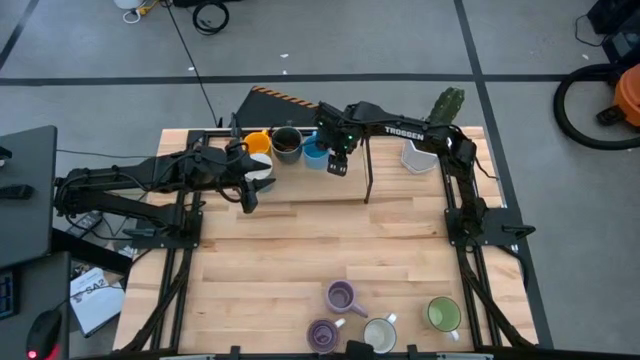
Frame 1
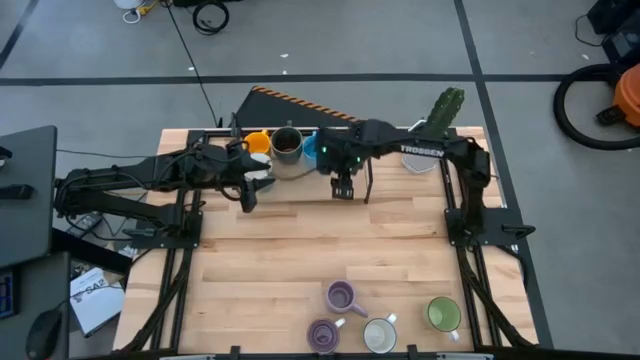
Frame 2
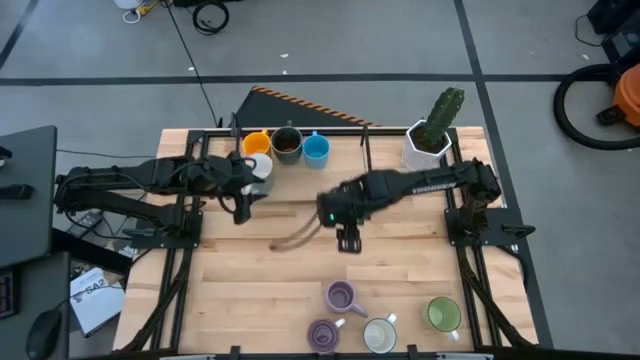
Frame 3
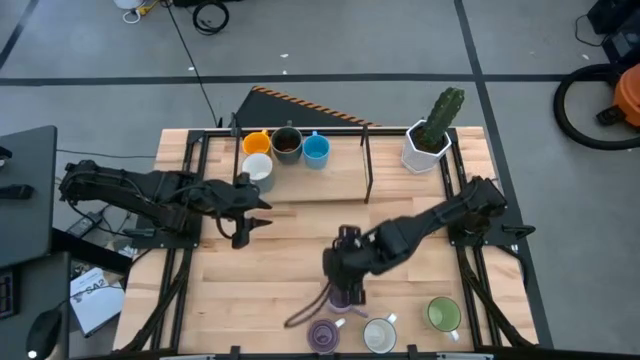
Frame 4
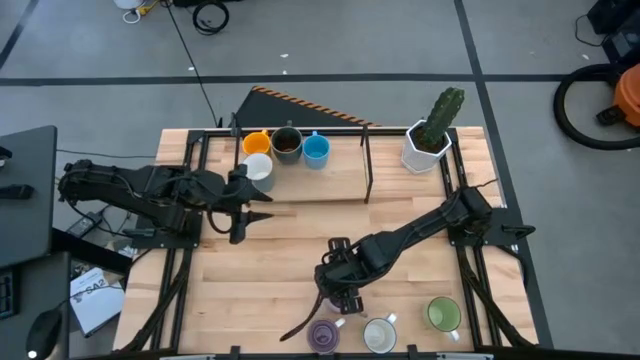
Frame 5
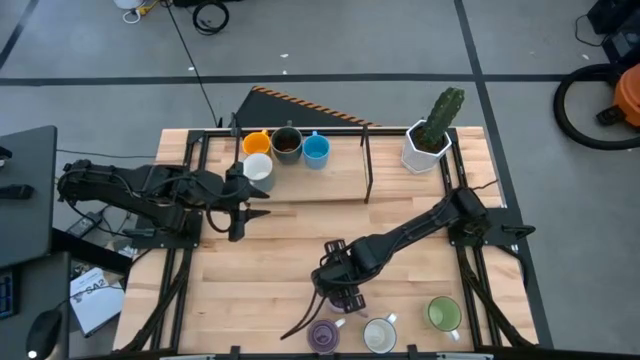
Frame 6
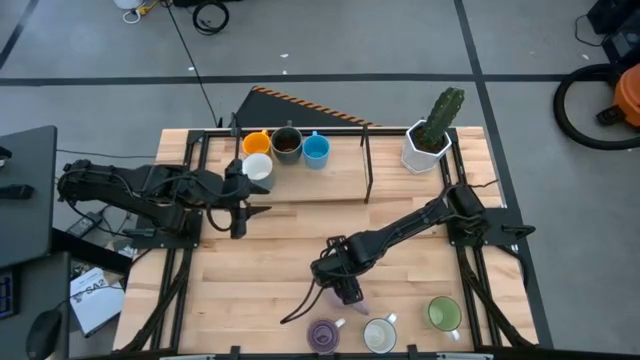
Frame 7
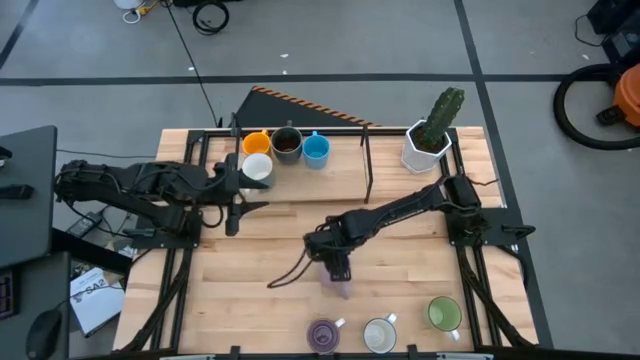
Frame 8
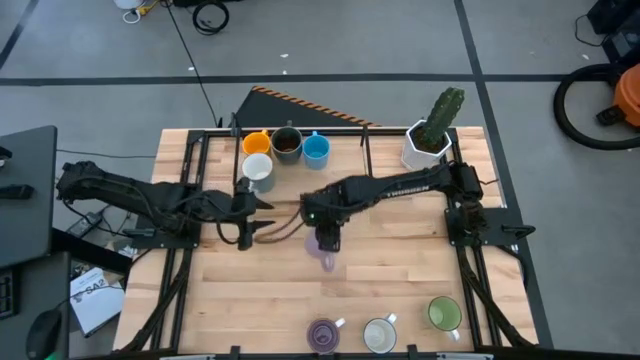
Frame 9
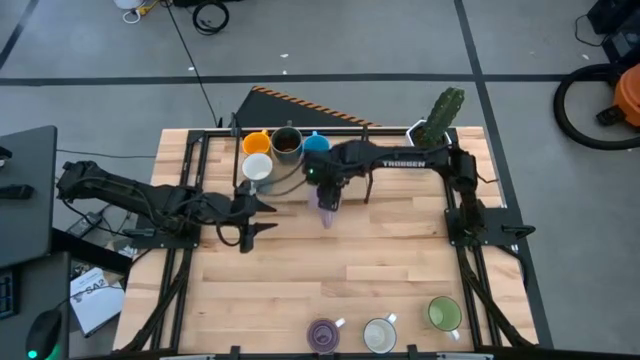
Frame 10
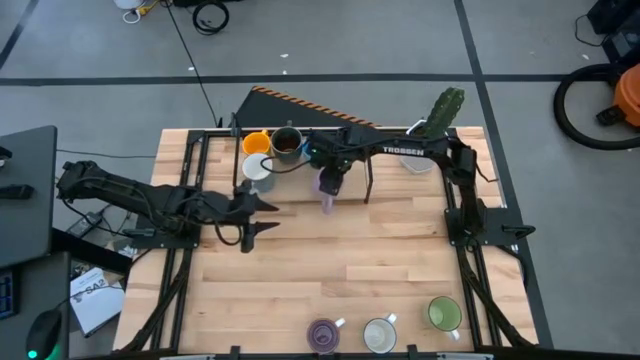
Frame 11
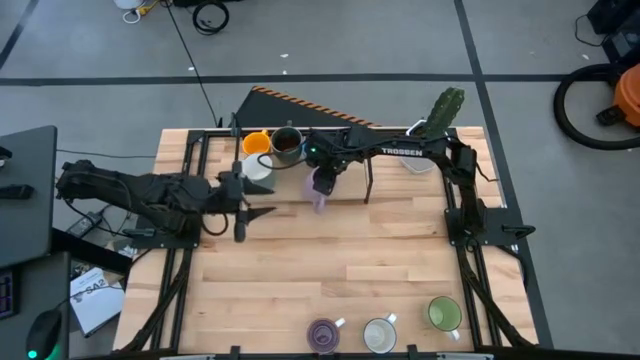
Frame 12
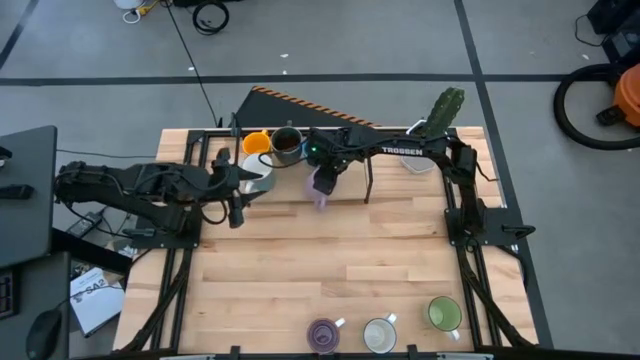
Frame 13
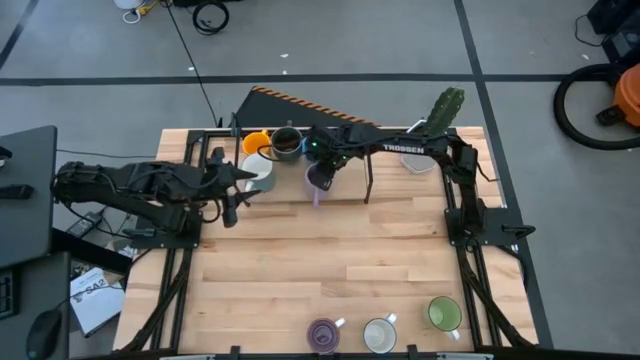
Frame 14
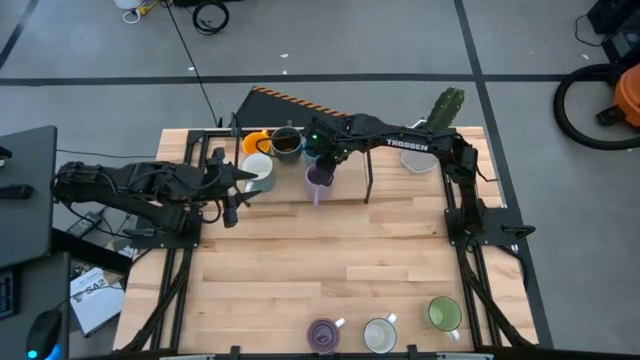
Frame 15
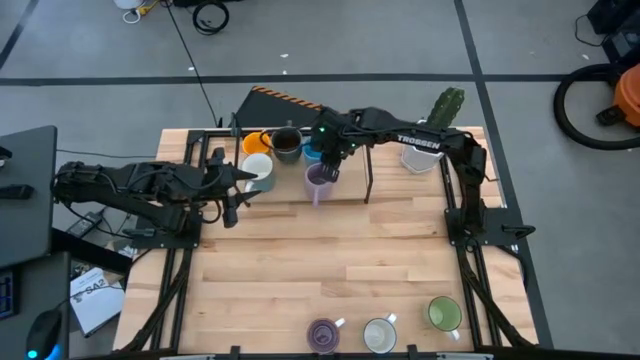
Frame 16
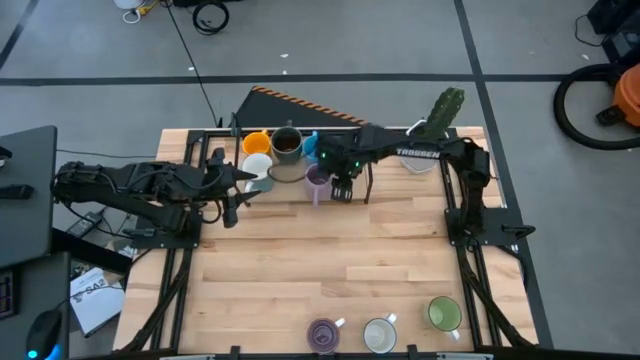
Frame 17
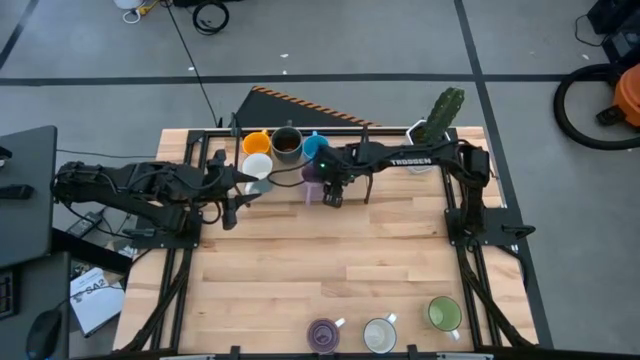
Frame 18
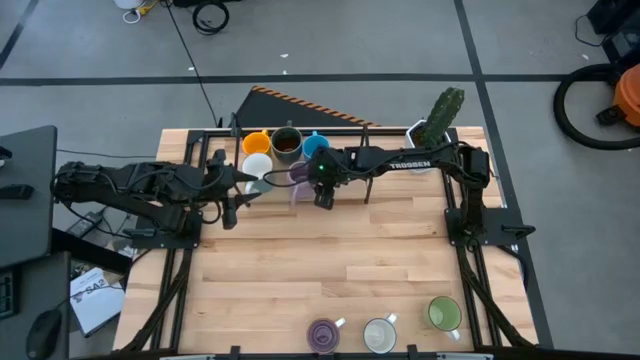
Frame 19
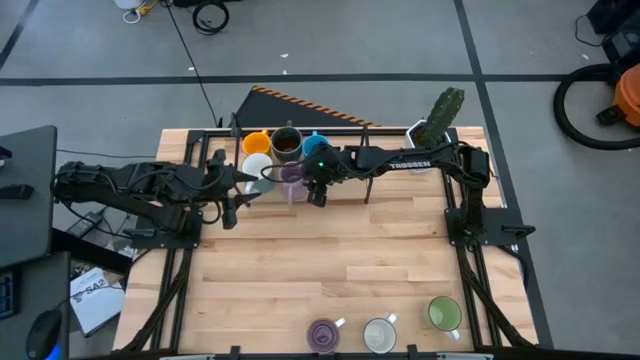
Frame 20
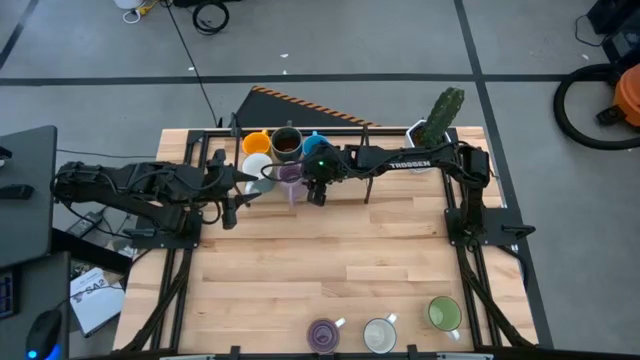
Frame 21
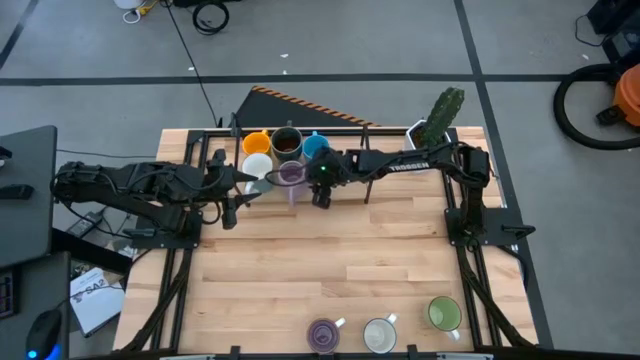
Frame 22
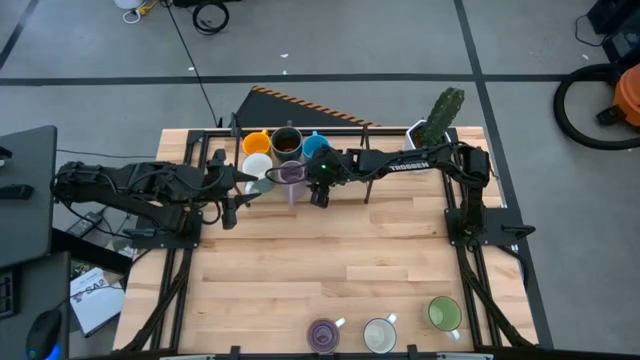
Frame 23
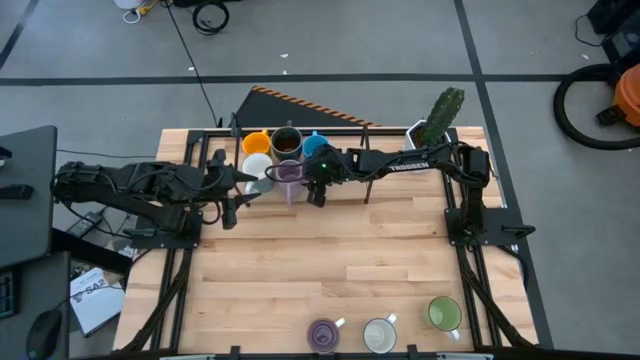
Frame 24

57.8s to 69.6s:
Task: Place coffee mugs
Put the purple mug on the shelf

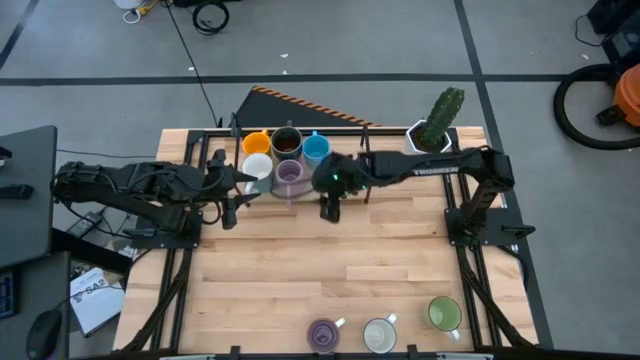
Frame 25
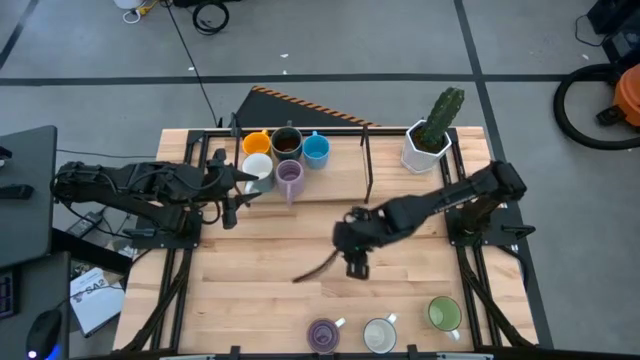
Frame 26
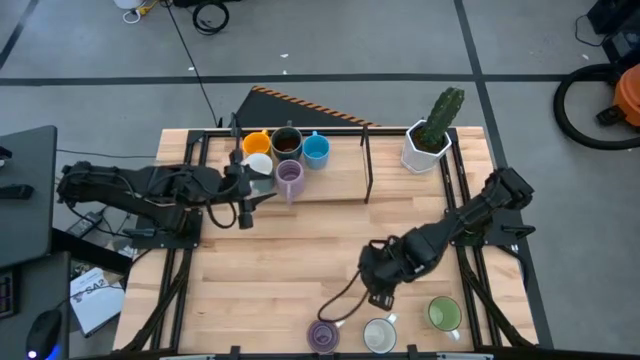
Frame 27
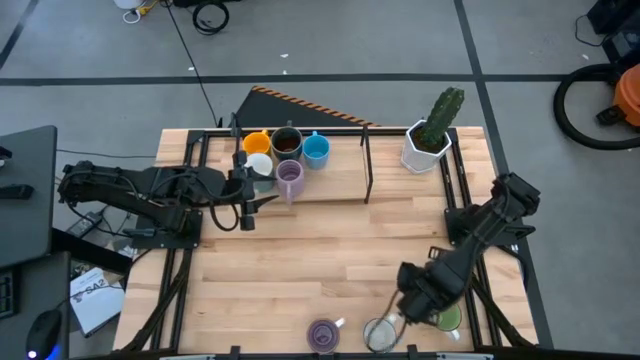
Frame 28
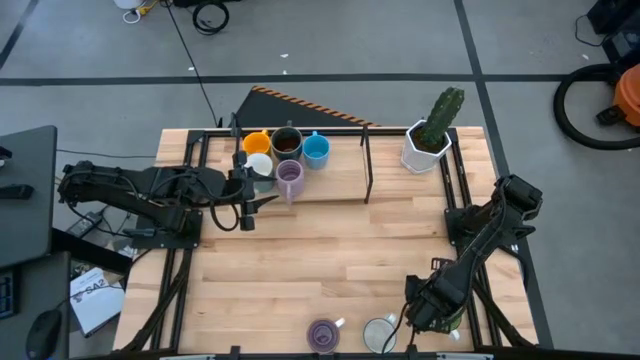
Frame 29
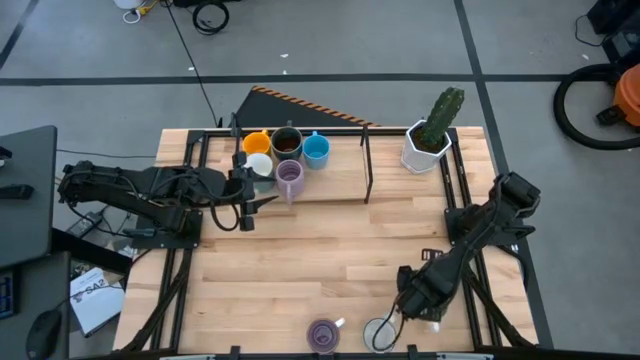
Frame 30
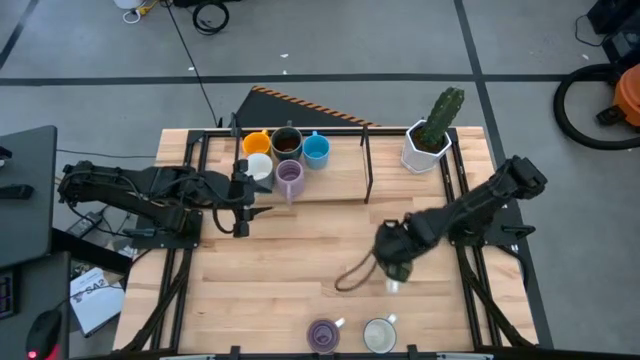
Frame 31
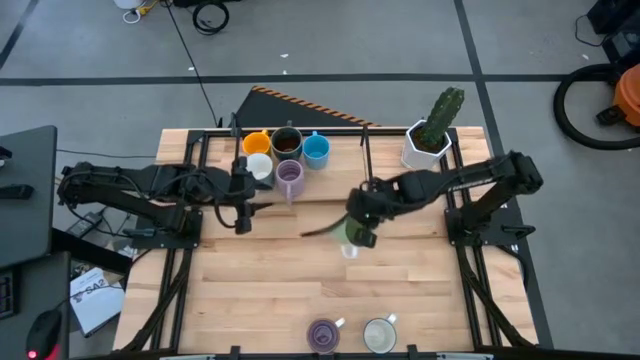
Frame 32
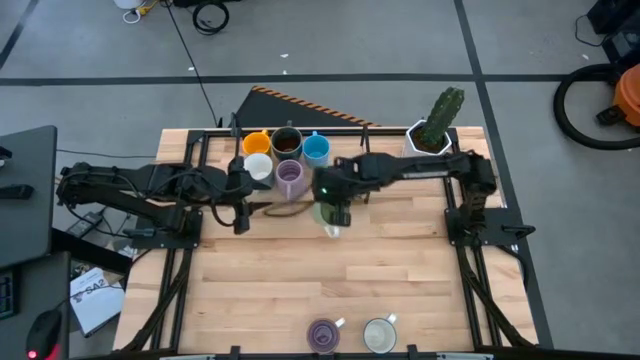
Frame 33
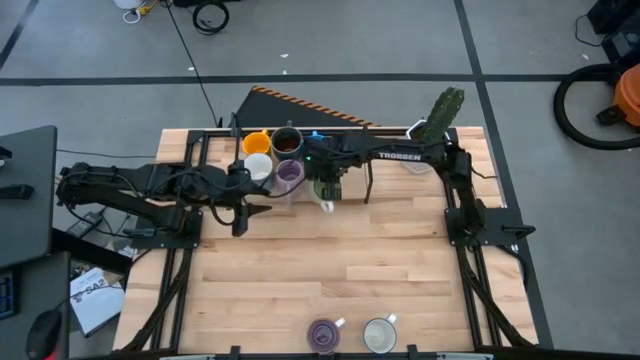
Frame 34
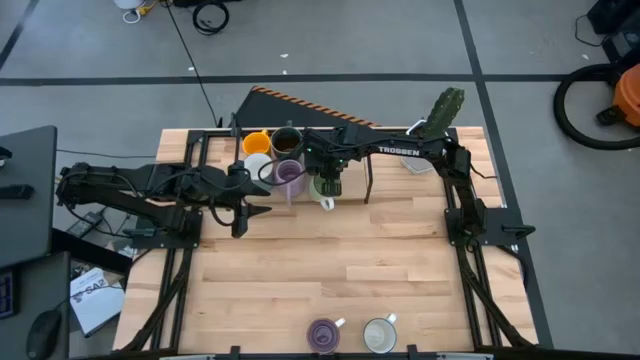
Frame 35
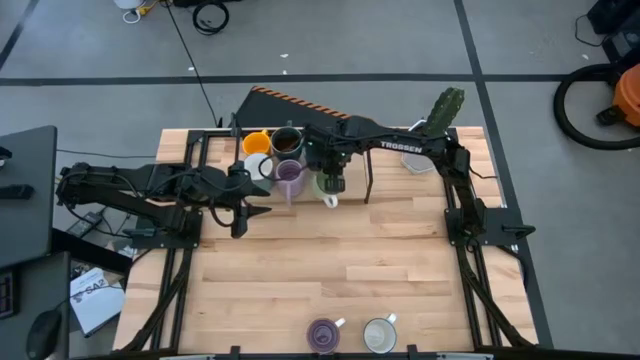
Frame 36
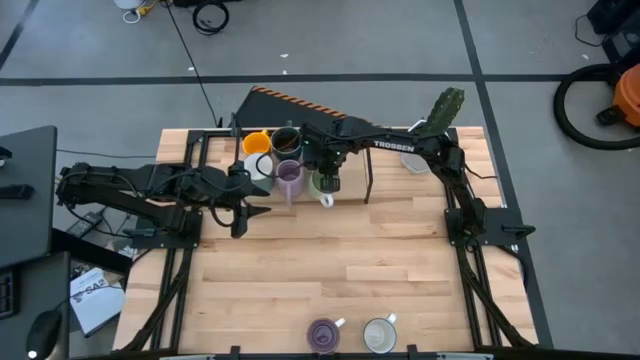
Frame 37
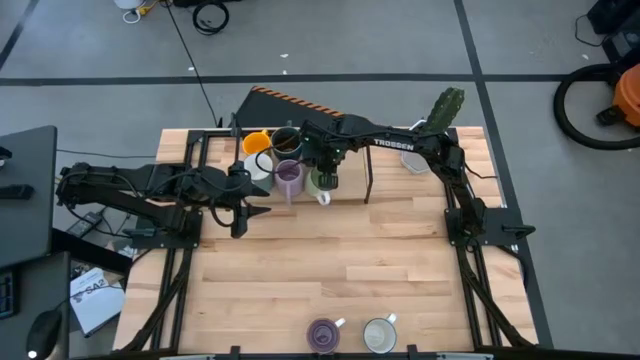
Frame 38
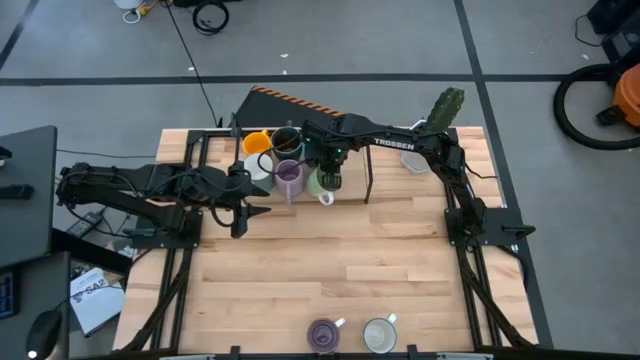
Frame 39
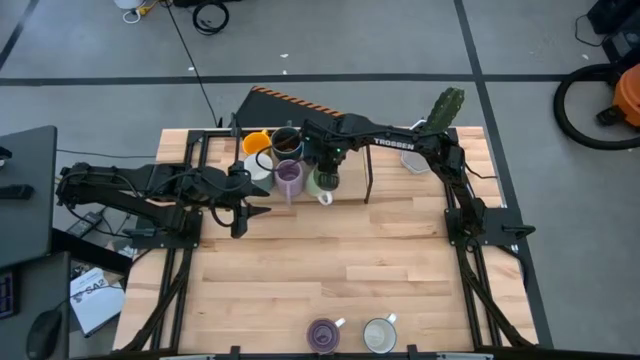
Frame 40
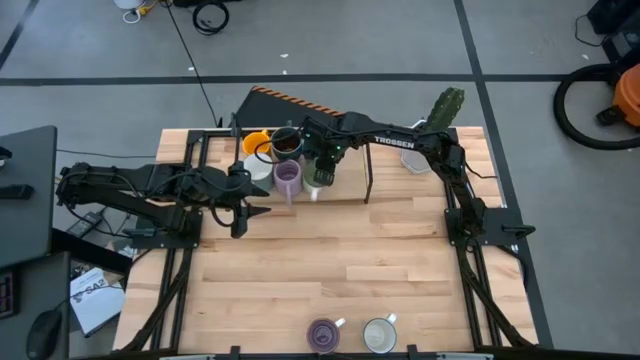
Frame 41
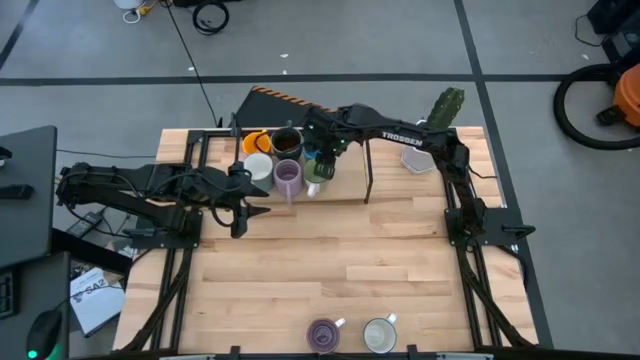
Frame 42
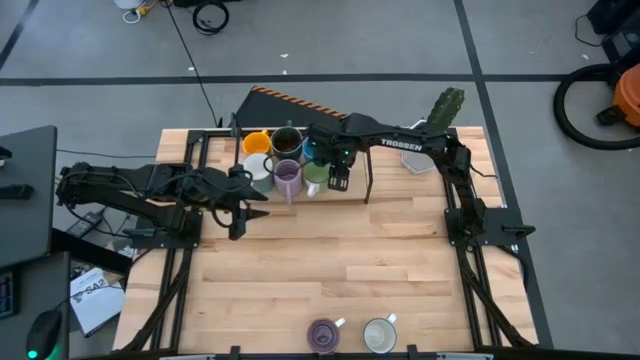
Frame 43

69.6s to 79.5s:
Put the green mug on the shelf
